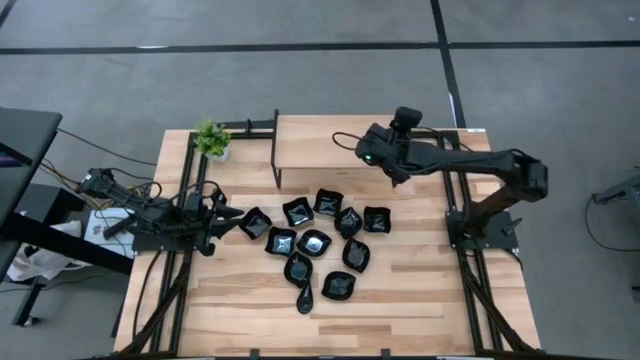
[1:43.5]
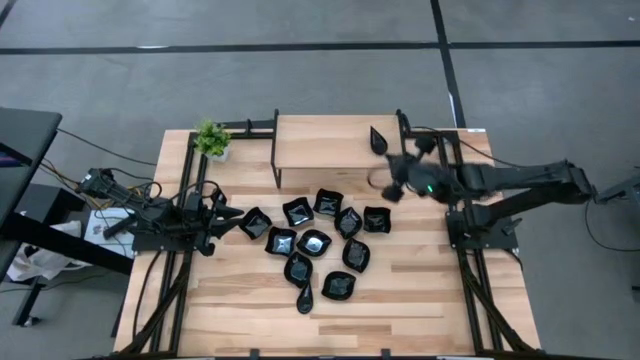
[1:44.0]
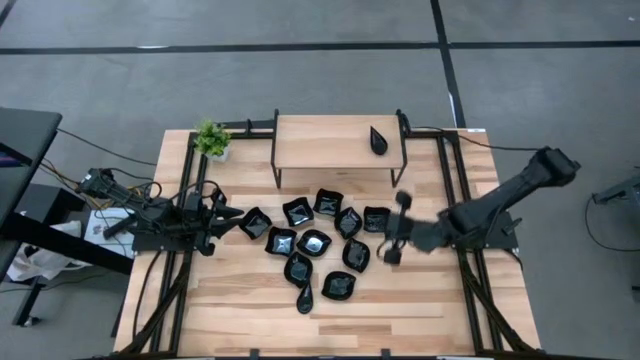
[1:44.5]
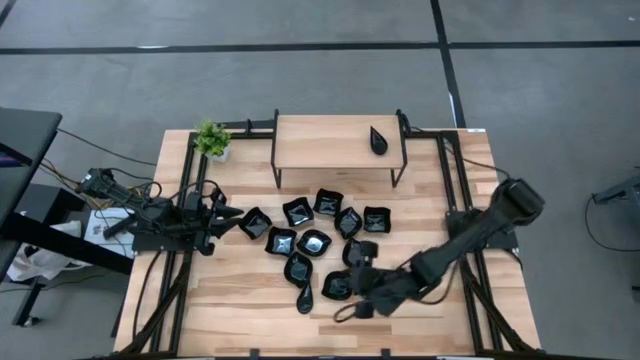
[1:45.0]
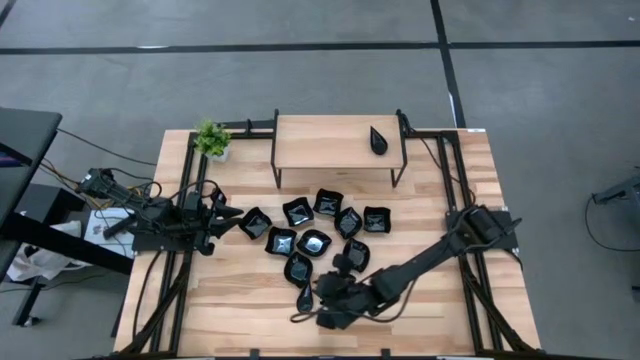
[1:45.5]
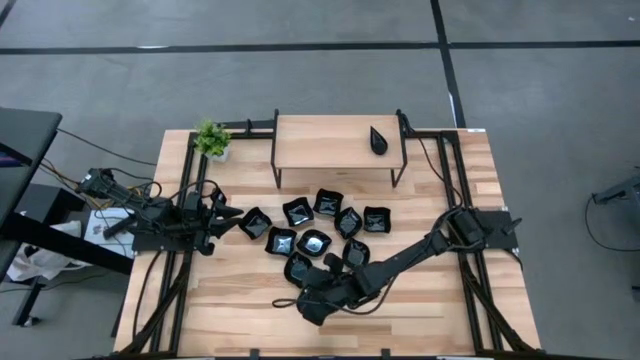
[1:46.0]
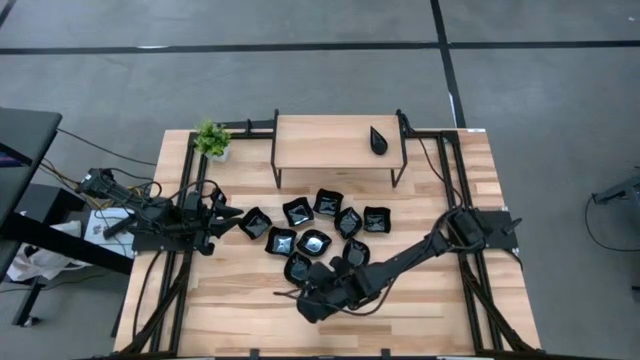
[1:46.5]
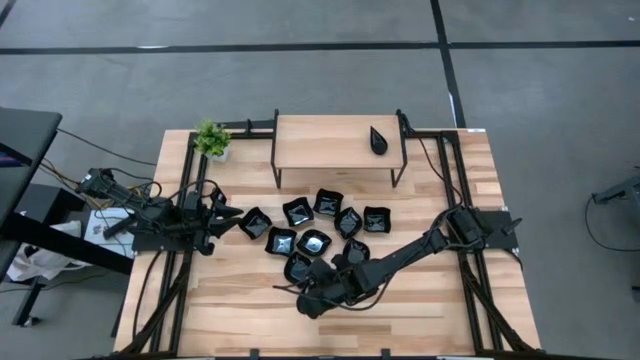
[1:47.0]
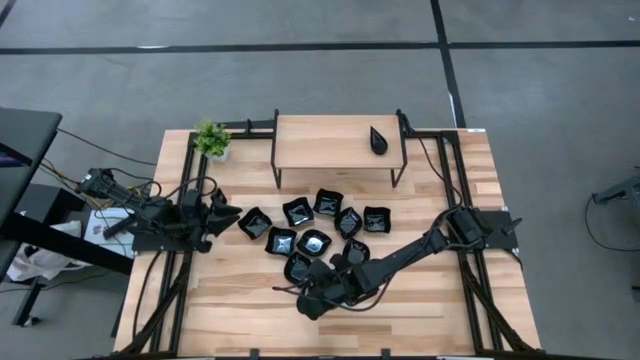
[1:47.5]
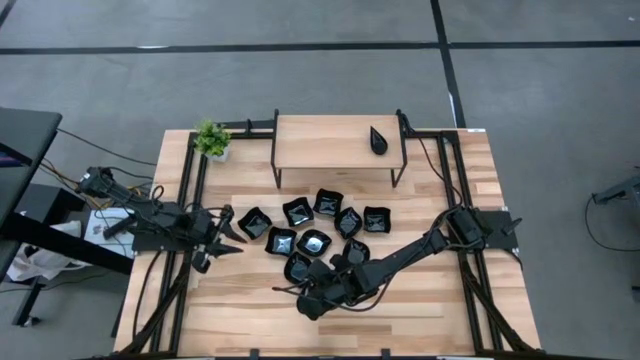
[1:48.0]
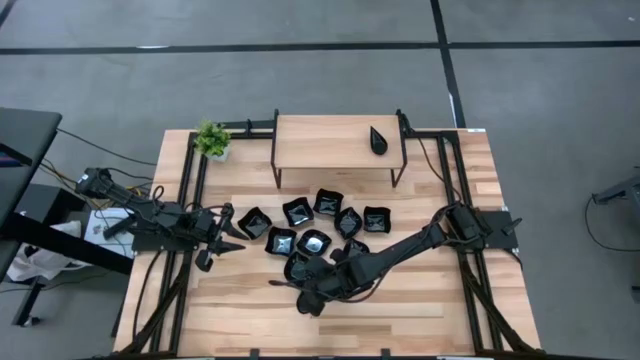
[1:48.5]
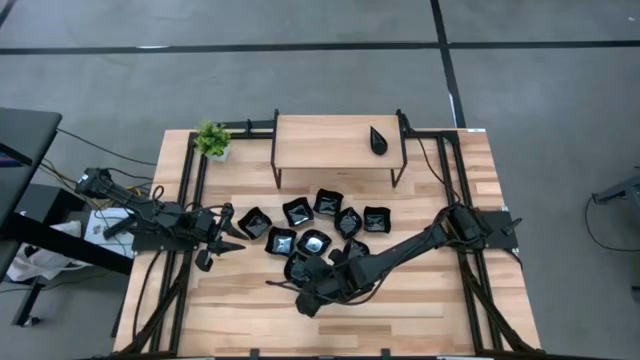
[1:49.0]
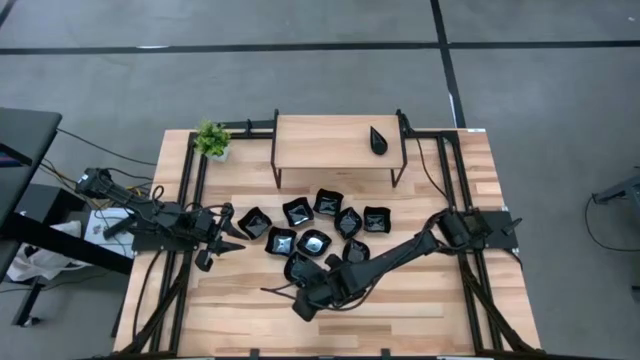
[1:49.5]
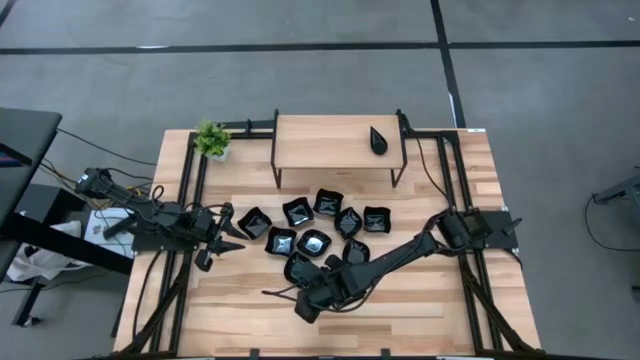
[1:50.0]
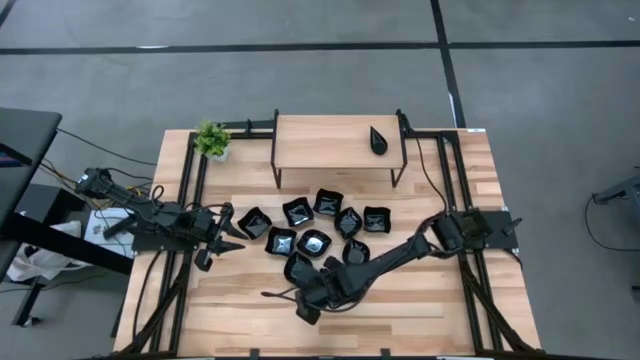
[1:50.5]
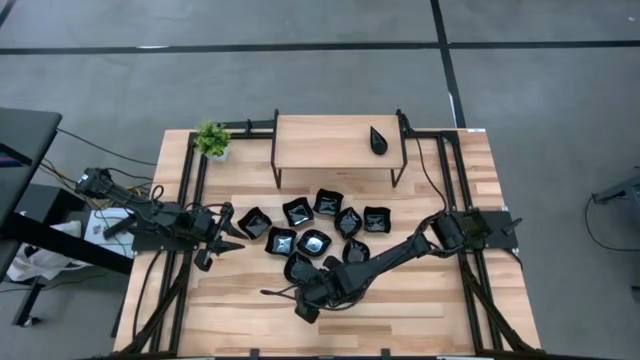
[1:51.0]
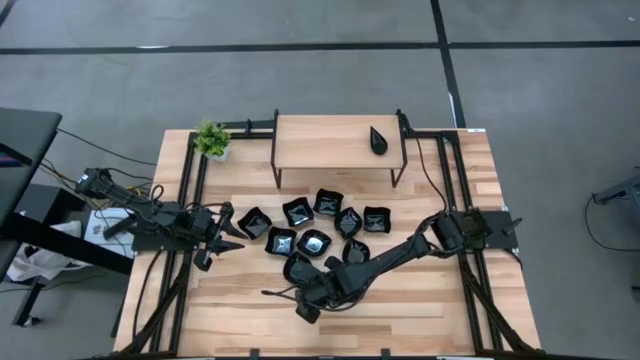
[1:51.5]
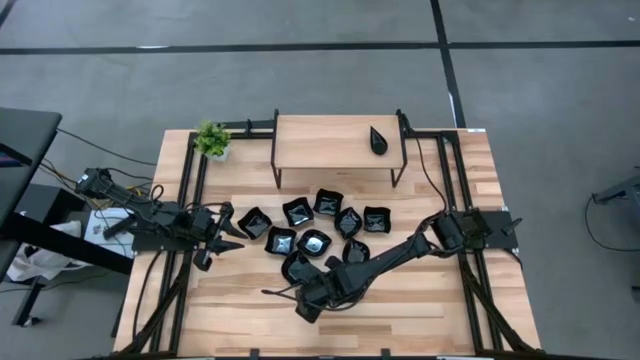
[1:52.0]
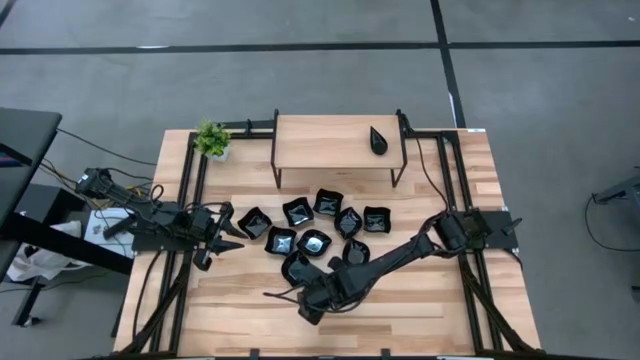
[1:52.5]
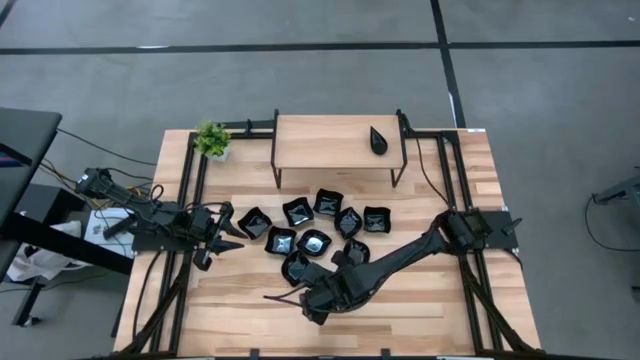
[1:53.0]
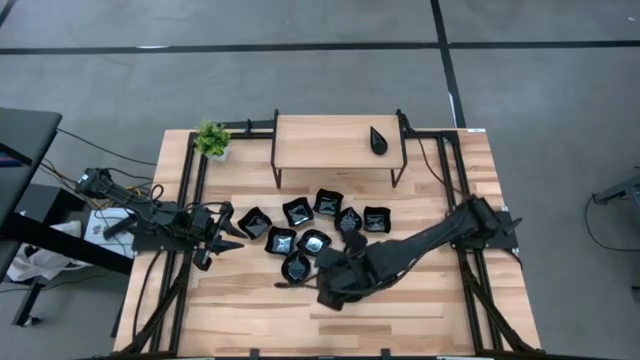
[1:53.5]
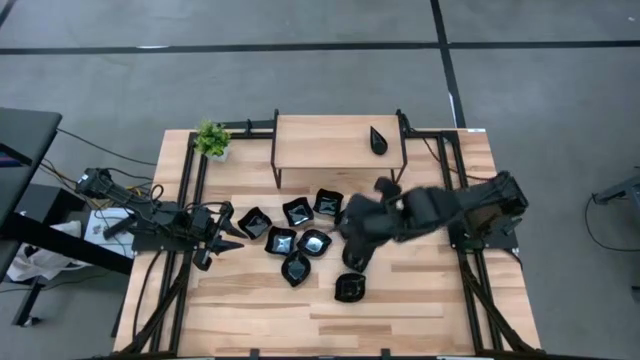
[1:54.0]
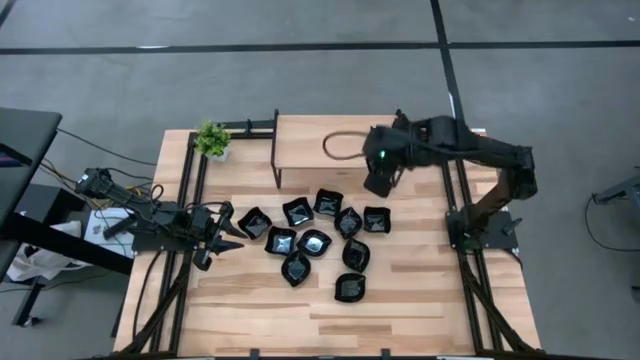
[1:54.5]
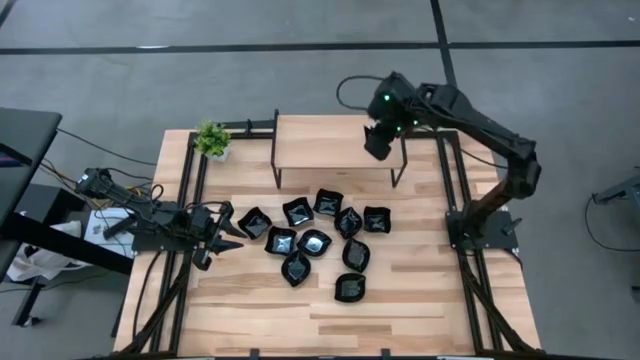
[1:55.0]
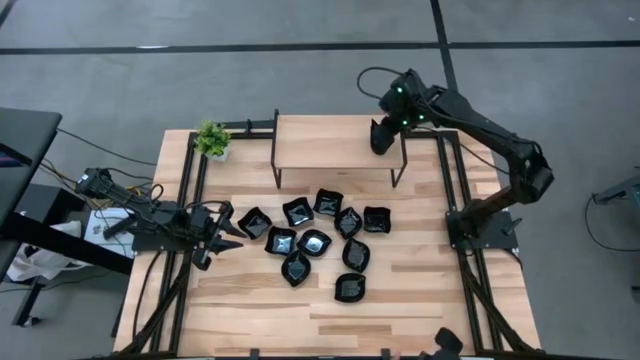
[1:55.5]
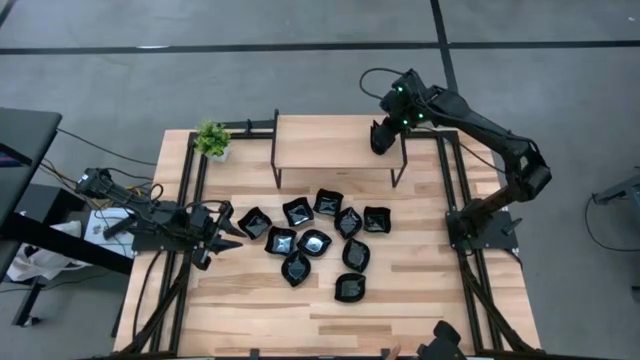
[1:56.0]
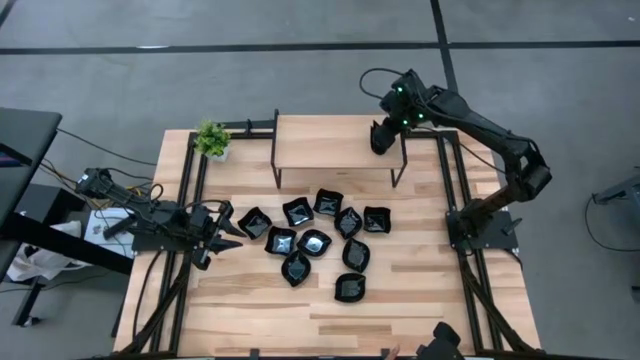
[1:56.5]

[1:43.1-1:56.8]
Task: Pick & Place Mini shaped plates
Stack the black drop shaped plate on top of the black drop shaped plate on the shelf

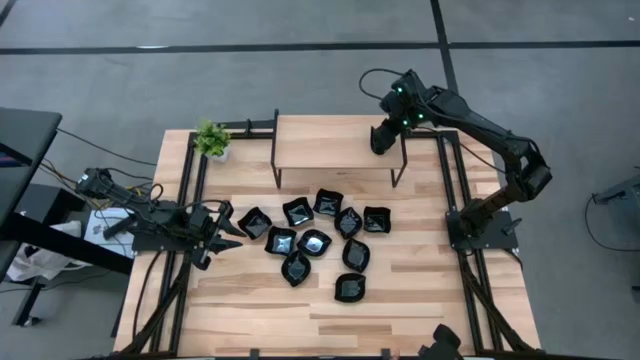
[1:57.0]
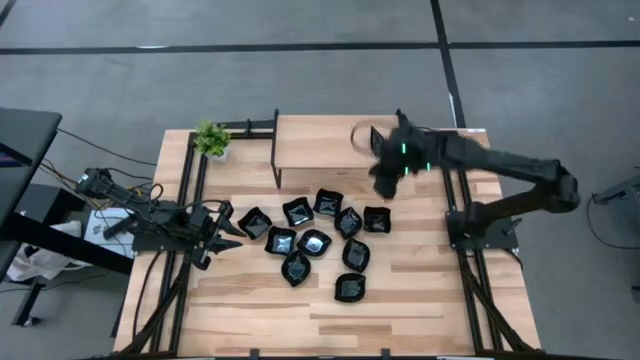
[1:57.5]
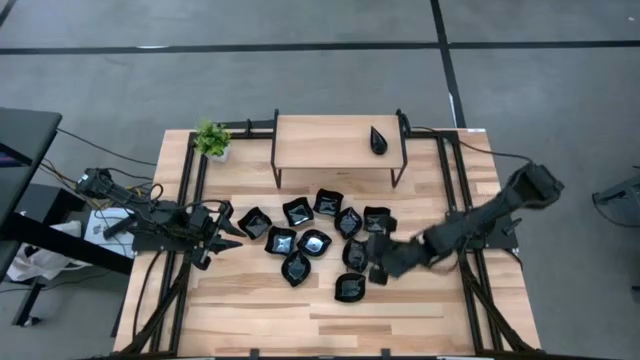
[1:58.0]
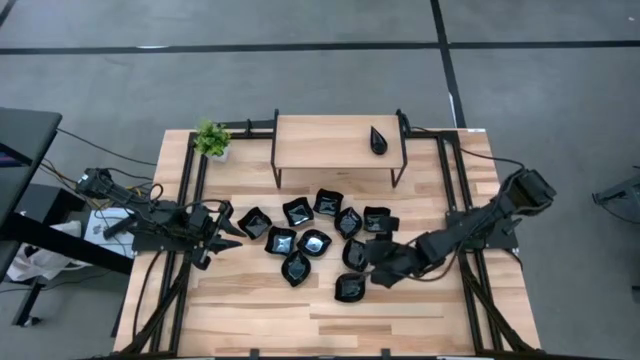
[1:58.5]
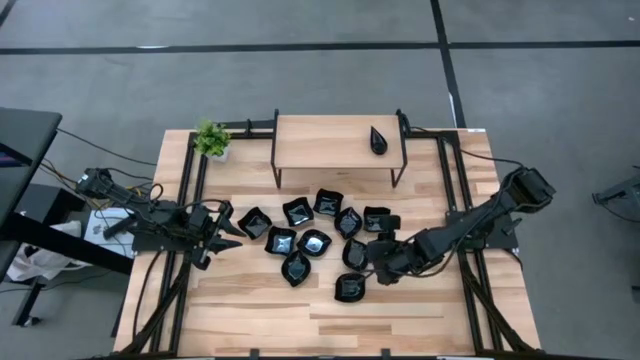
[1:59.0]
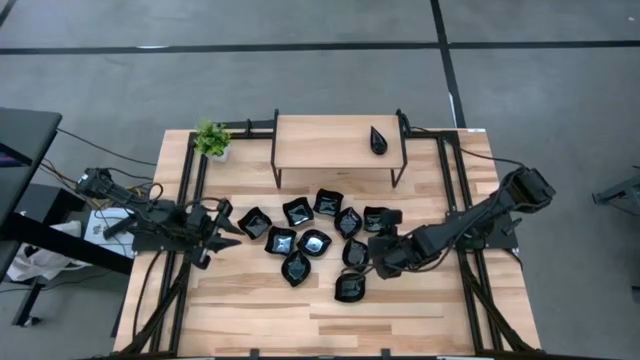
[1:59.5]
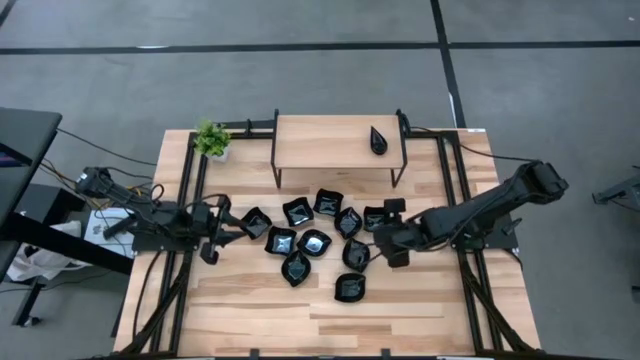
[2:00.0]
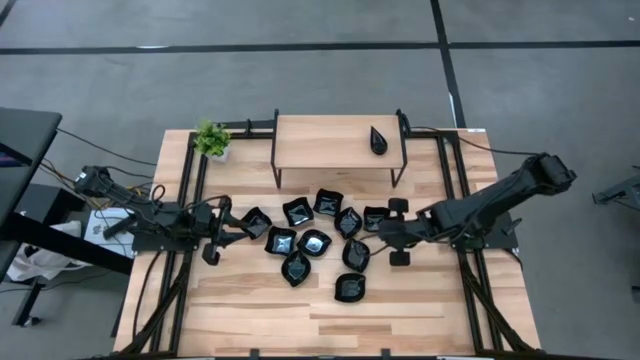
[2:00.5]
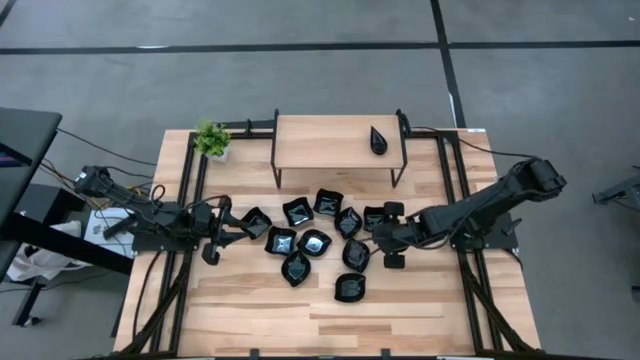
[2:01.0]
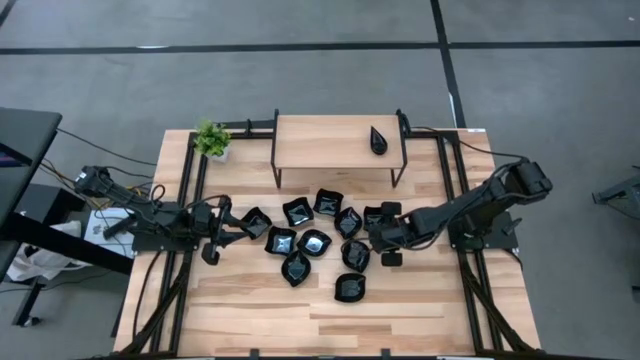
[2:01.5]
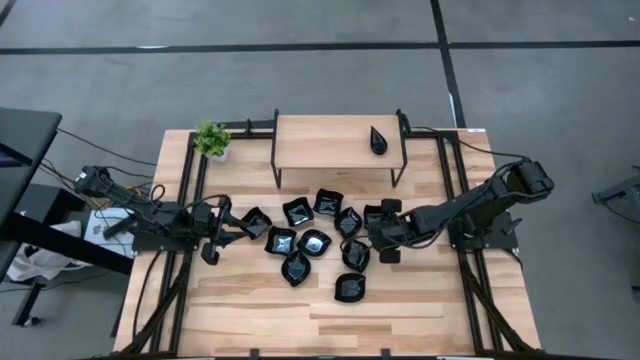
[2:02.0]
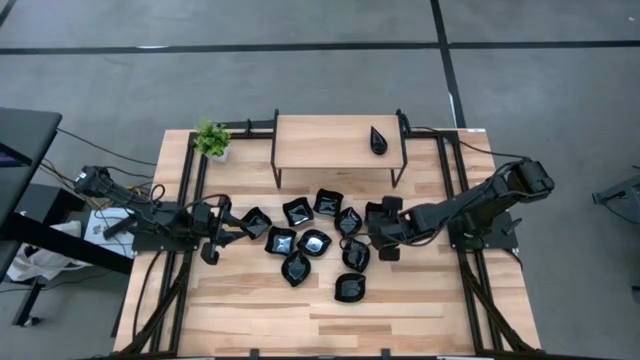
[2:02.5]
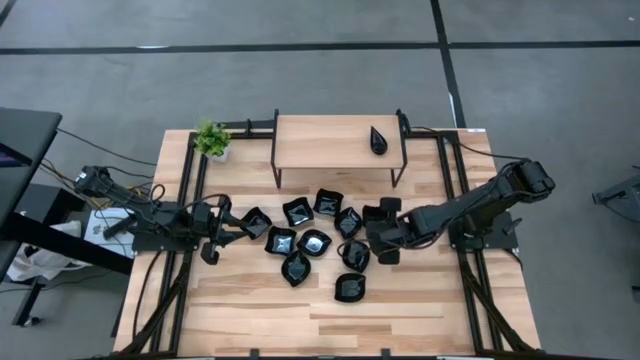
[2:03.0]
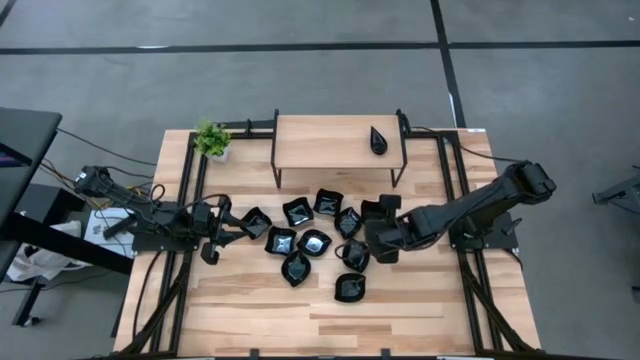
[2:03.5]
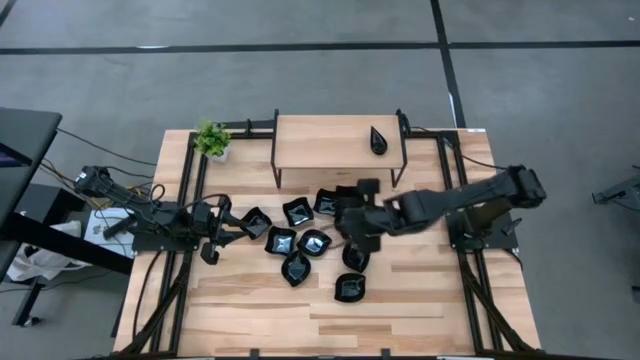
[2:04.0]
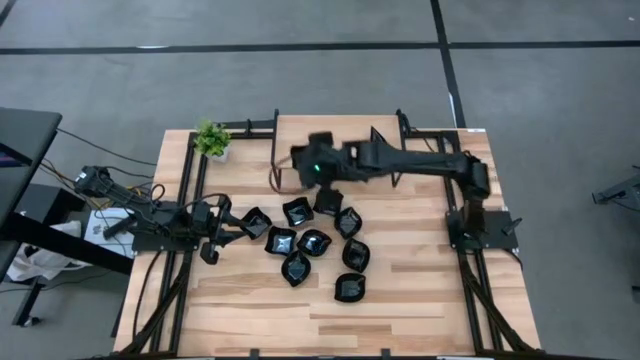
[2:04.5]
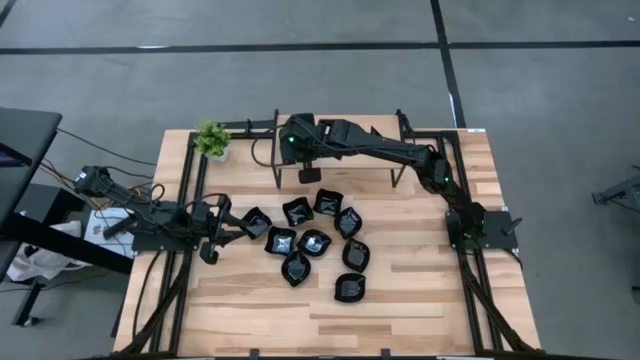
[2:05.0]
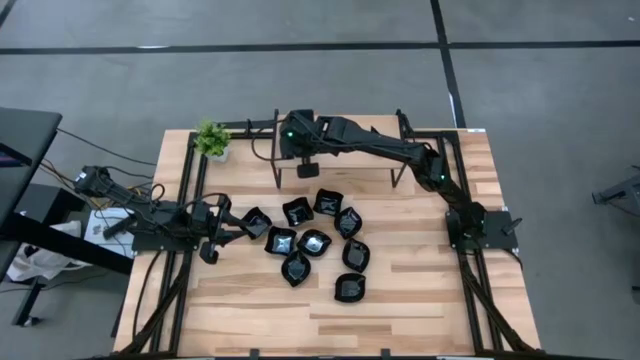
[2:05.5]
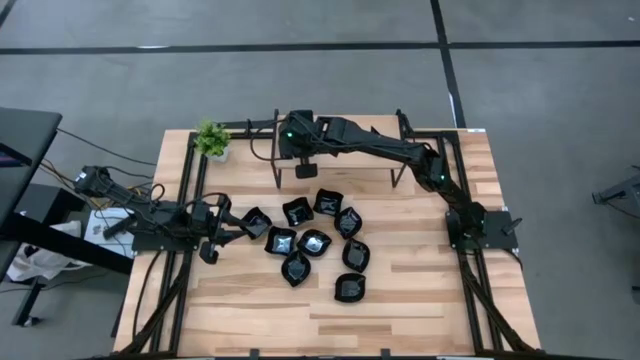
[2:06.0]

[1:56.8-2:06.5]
Put the black distorted square plate on the shelf
